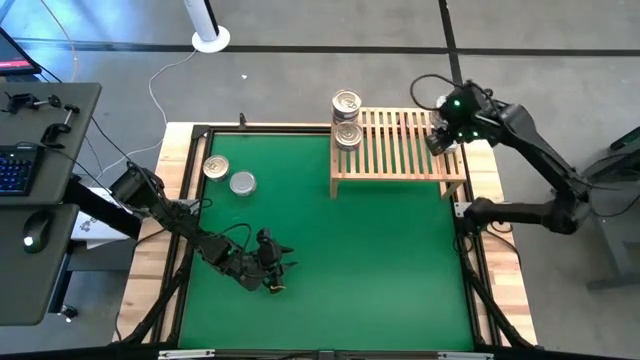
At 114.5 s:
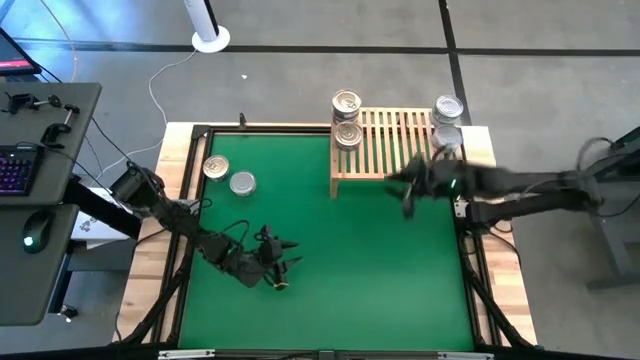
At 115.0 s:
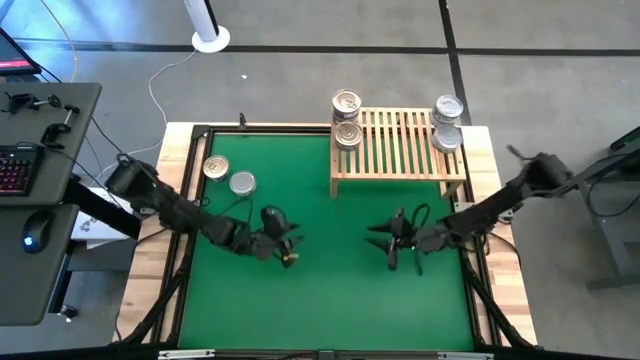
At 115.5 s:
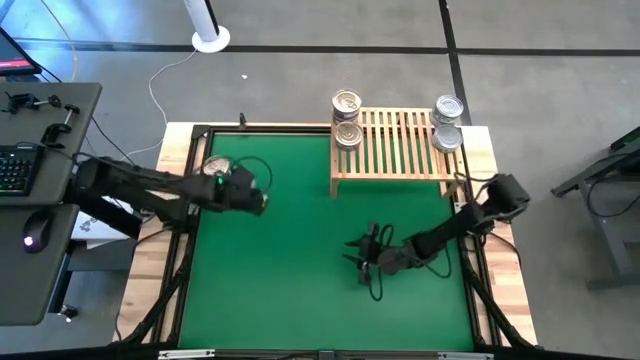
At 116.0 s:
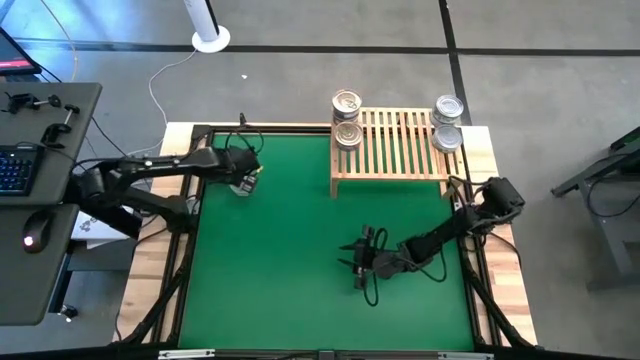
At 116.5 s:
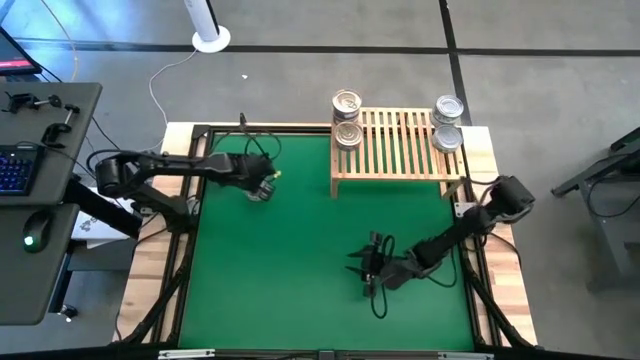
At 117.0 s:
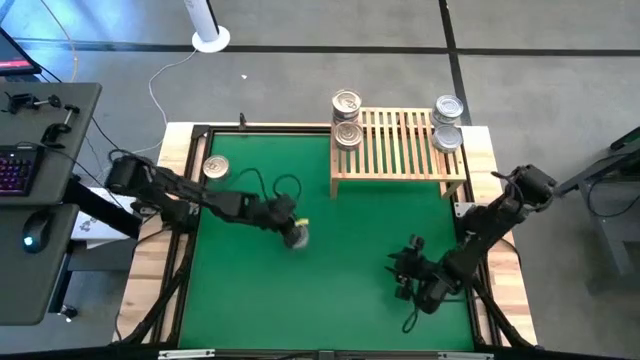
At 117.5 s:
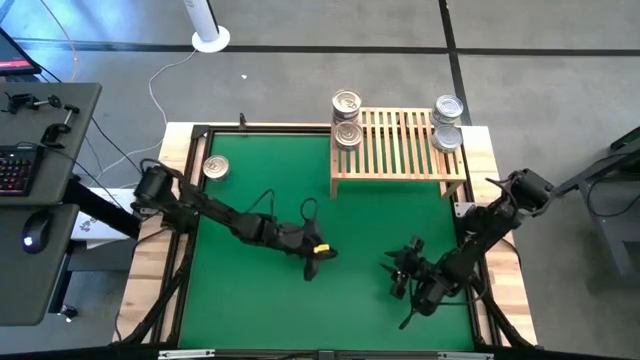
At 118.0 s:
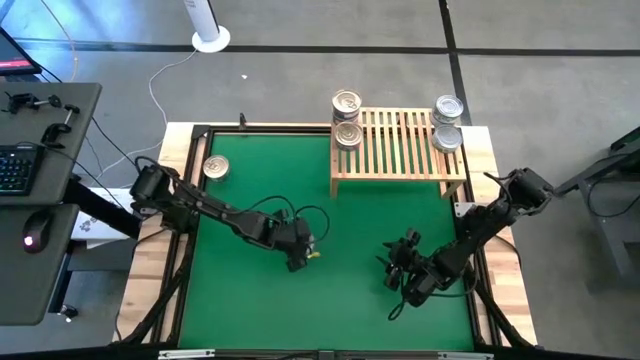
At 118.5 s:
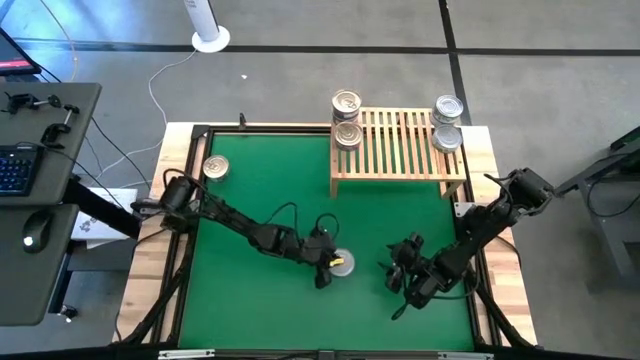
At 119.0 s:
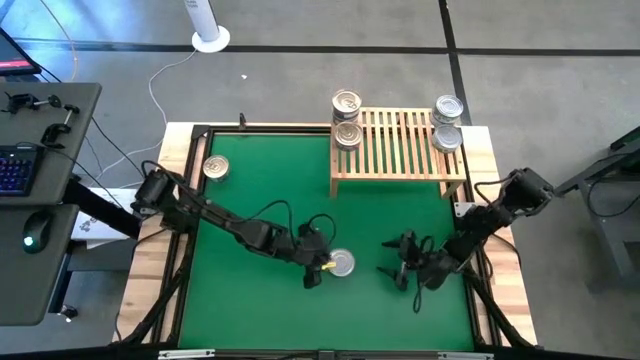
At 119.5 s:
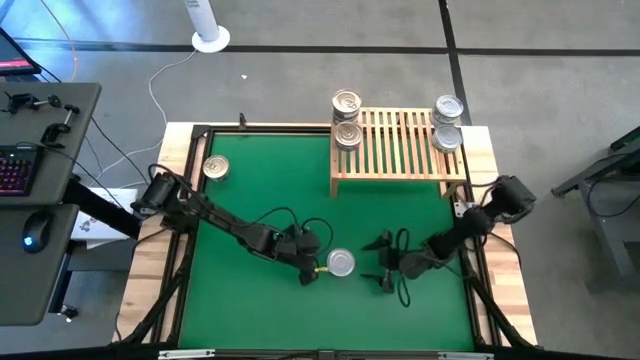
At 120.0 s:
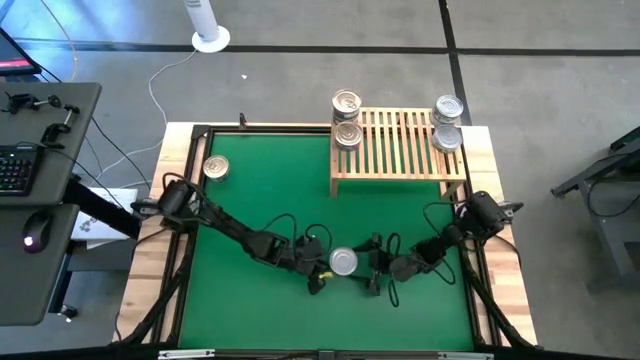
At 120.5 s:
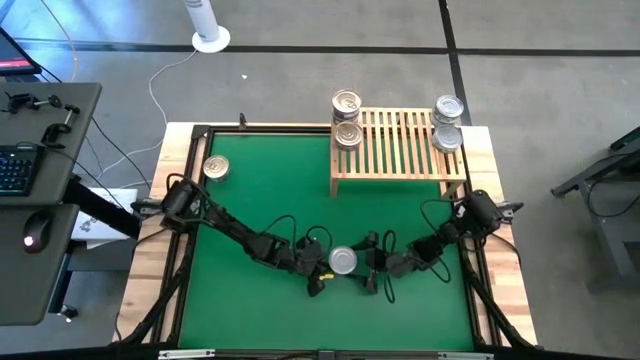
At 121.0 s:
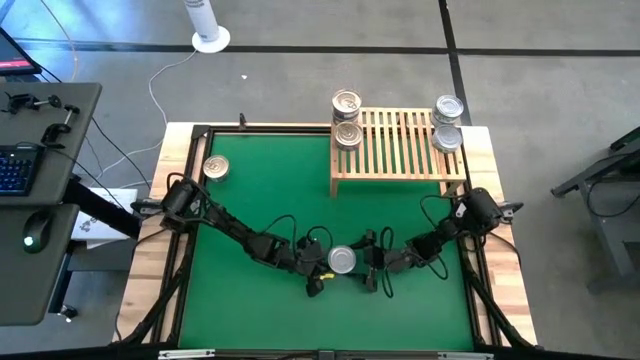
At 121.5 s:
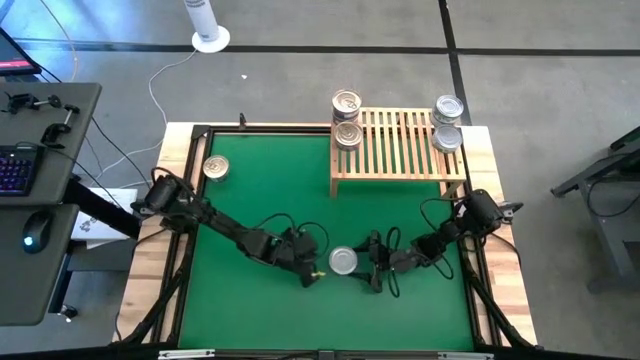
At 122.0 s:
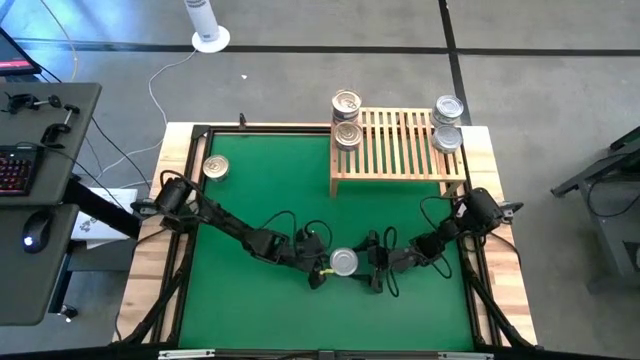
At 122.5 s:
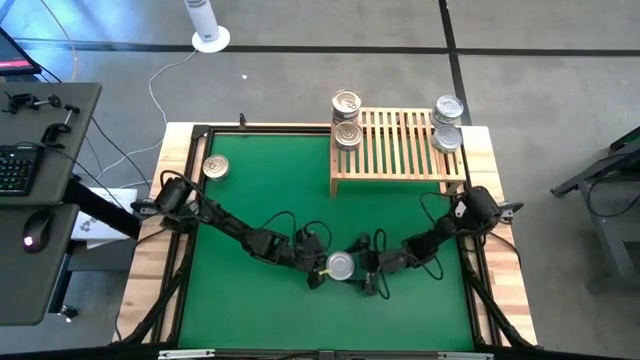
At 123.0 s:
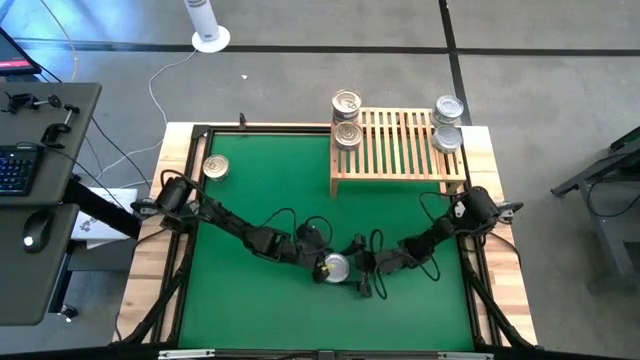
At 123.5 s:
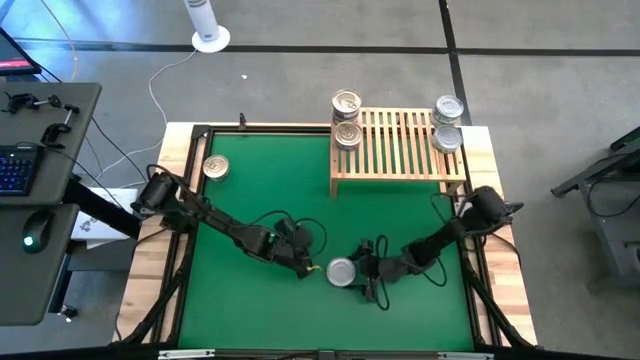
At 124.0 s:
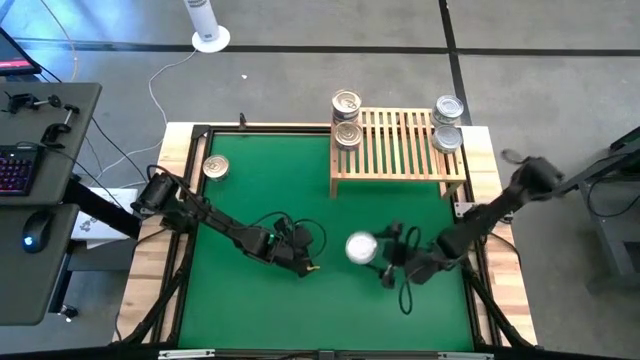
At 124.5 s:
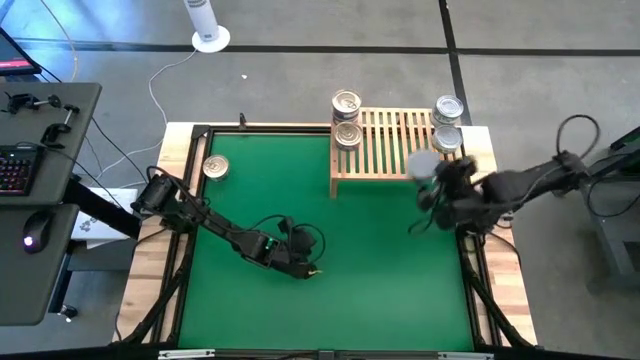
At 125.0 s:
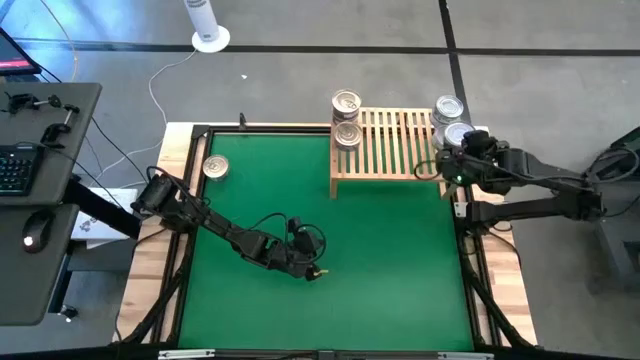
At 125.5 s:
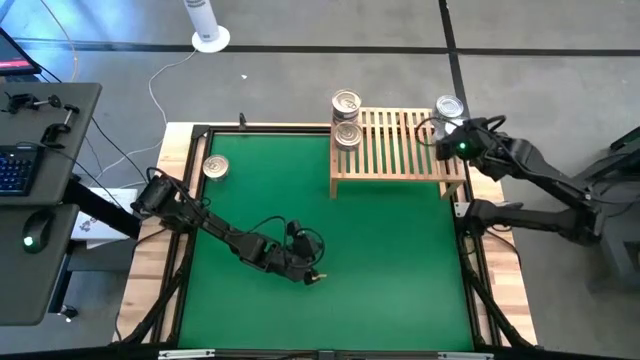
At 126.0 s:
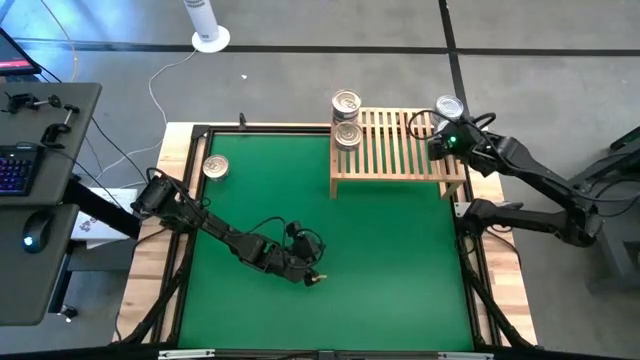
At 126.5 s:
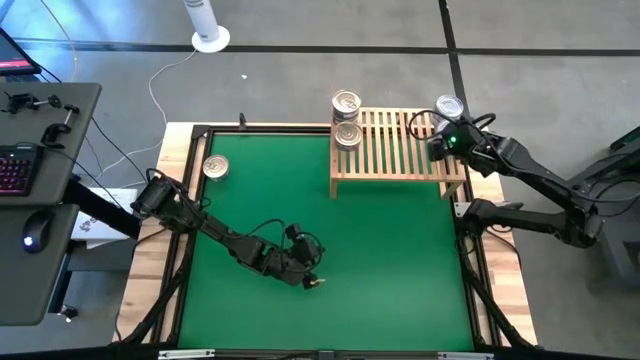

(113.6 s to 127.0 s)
Task: Stack canned seafood by type on shelf
Stack the green tuna can on top of the green tuna can on the shelf

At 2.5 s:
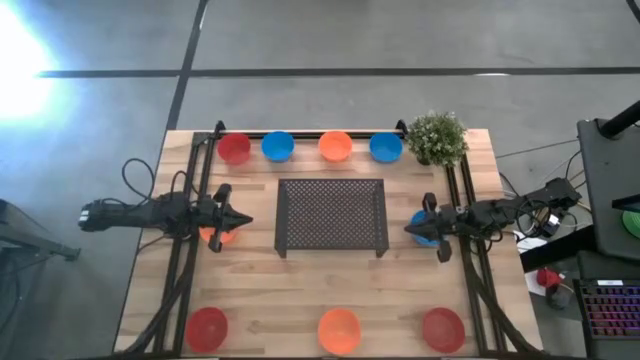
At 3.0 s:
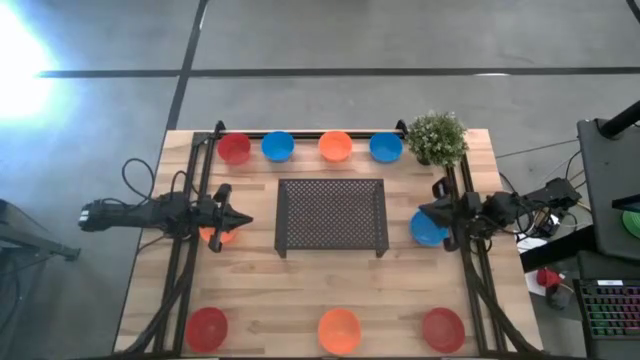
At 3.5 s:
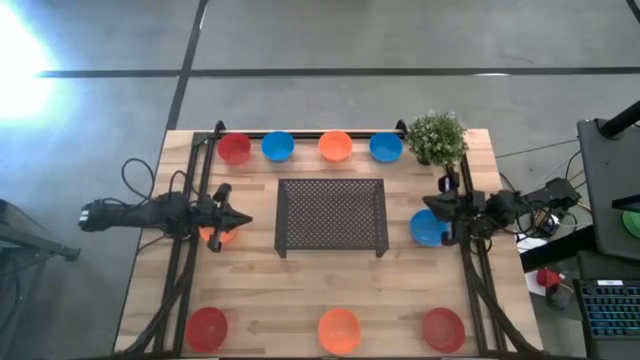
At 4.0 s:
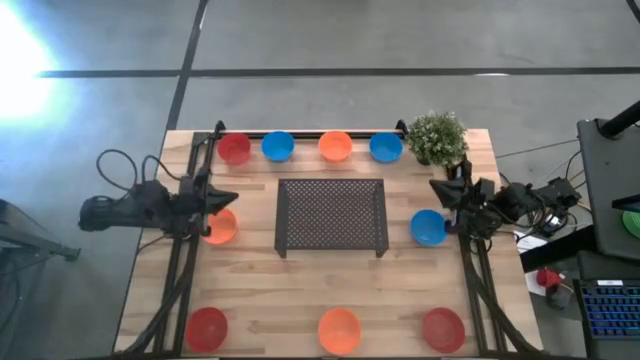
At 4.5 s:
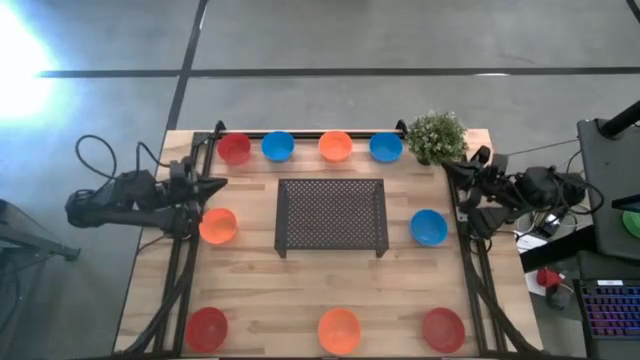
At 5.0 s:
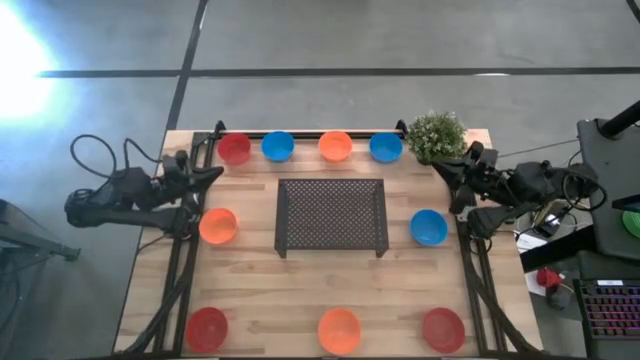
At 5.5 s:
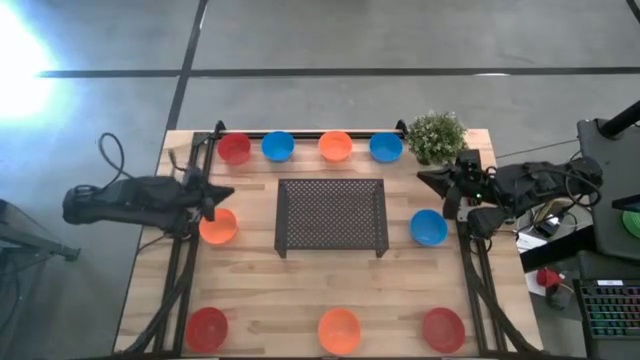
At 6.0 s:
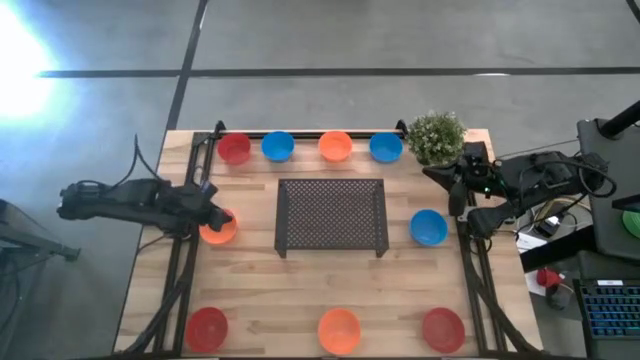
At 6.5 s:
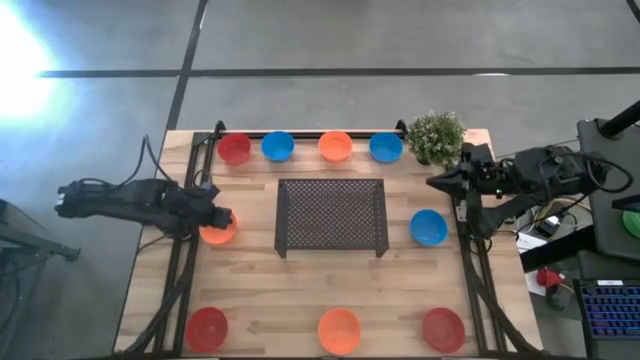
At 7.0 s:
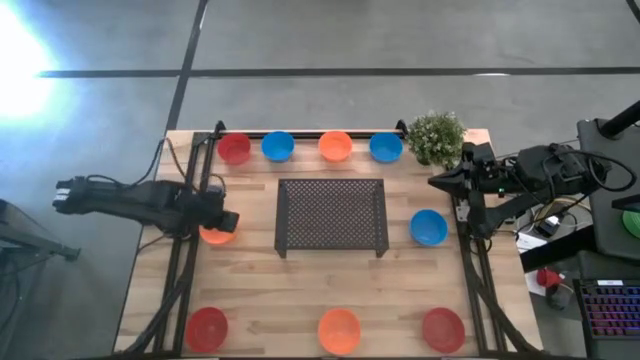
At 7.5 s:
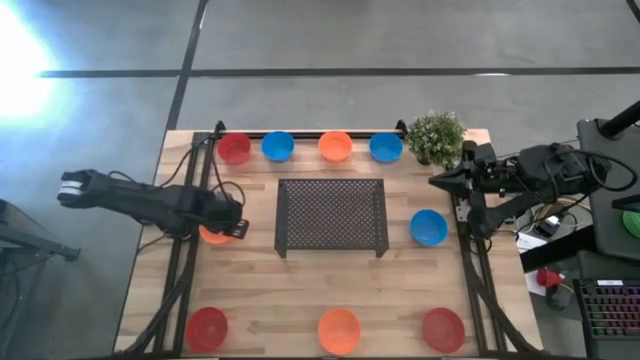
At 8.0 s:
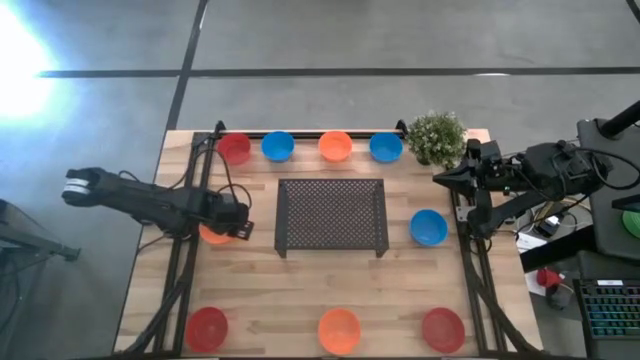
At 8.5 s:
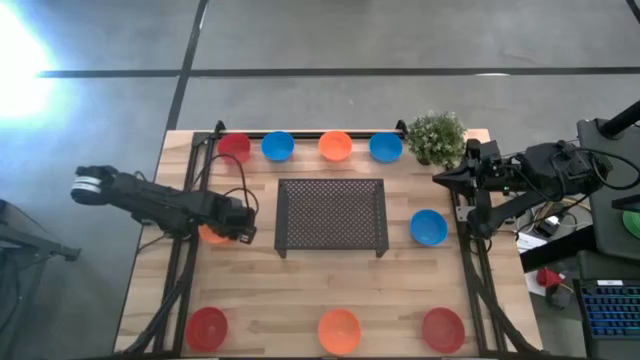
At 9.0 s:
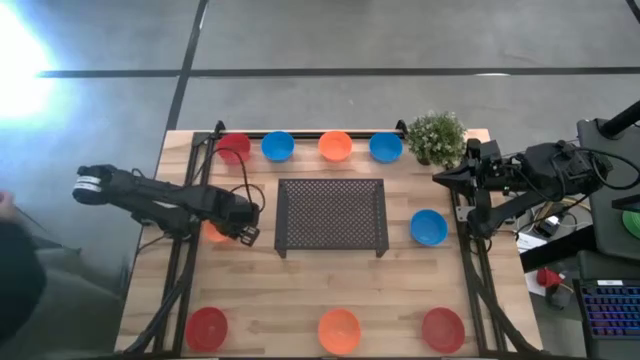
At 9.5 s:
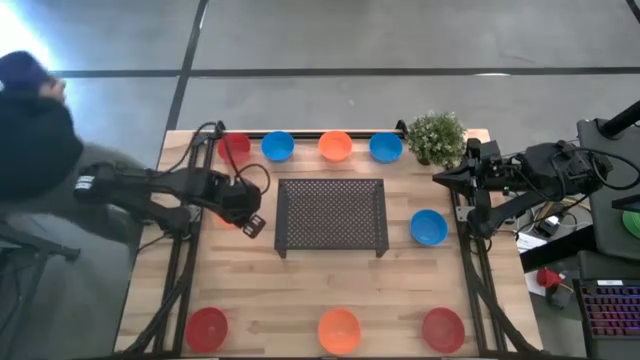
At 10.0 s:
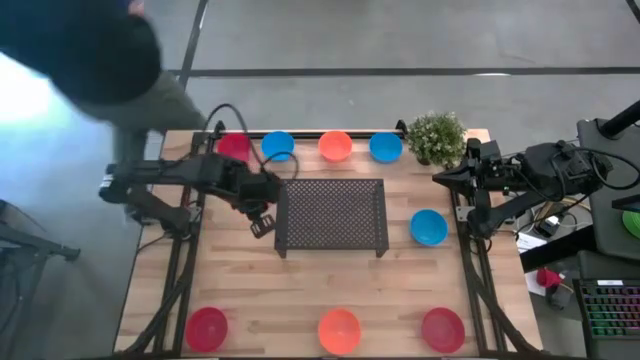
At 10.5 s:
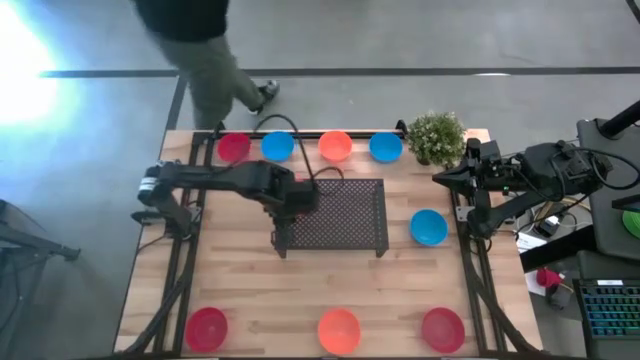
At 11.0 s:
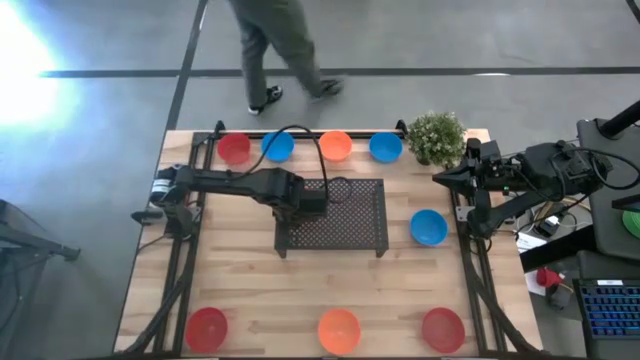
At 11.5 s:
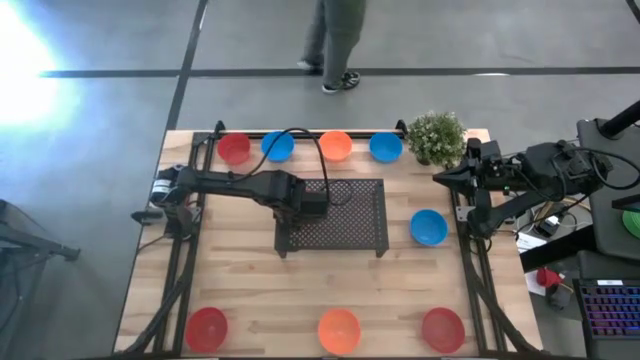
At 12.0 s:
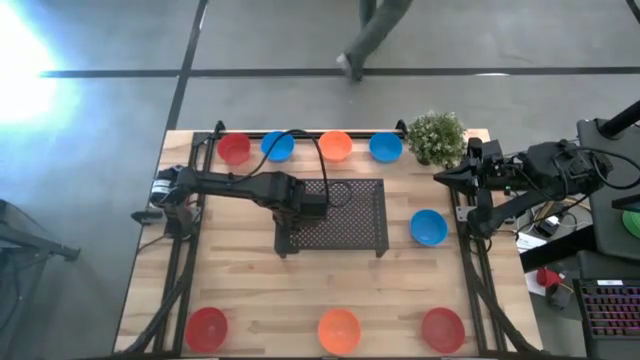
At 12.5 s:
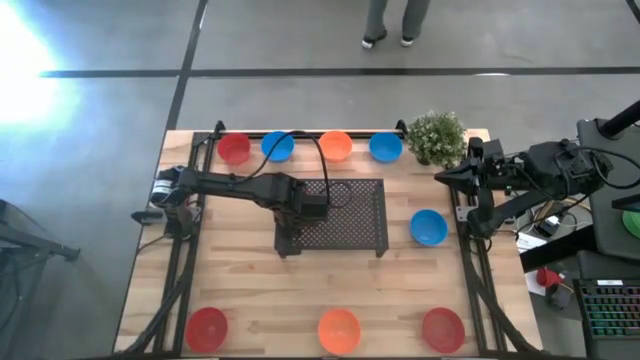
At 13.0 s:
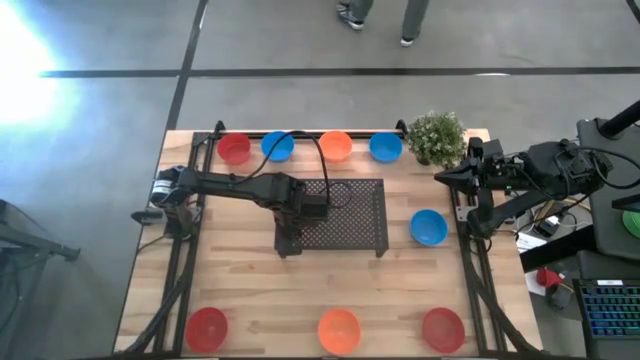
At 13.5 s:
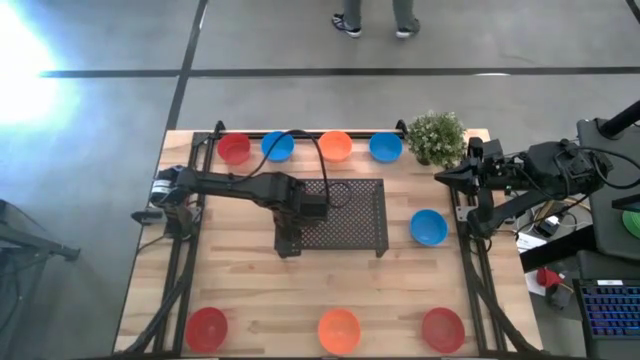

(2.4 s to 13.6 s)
Task: Pick & Place Mini bowls
Put the left orange bowl on the shelf
